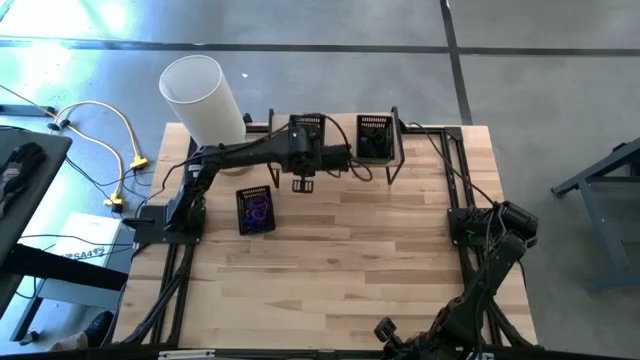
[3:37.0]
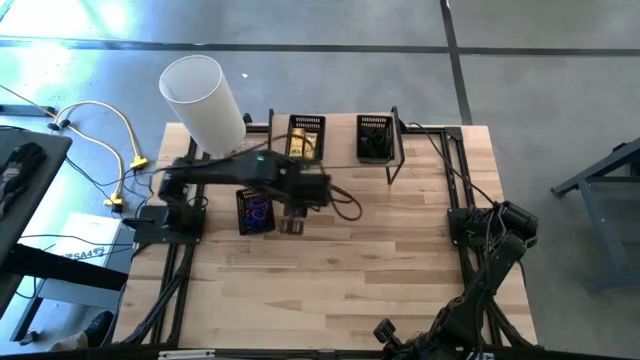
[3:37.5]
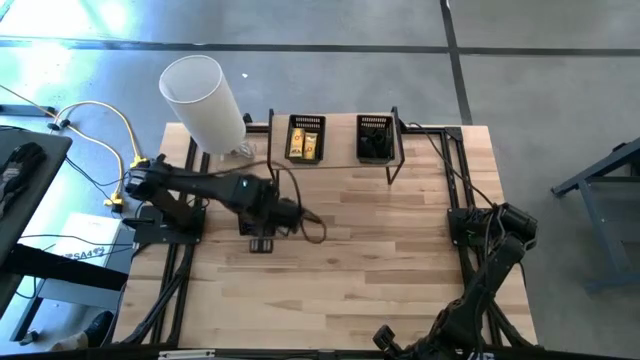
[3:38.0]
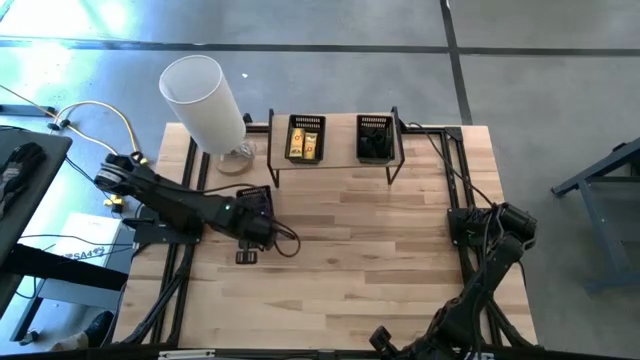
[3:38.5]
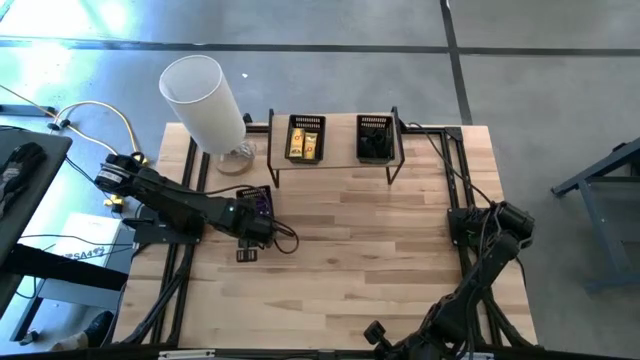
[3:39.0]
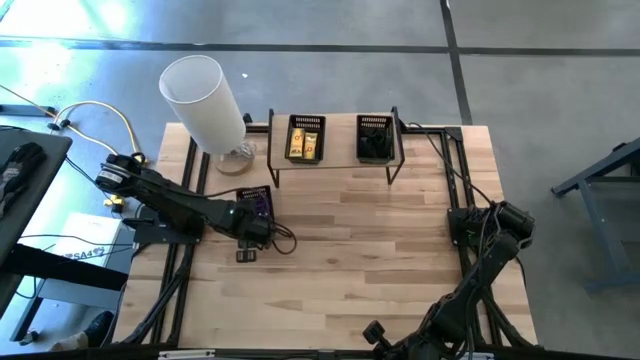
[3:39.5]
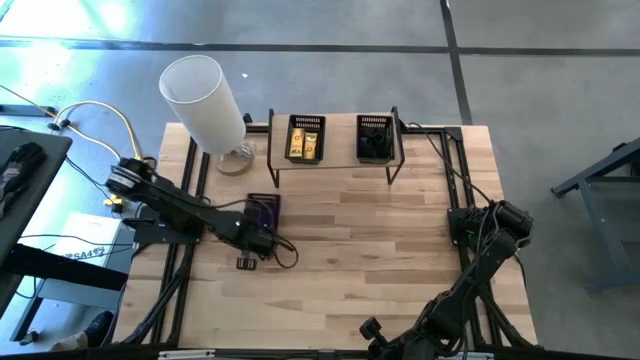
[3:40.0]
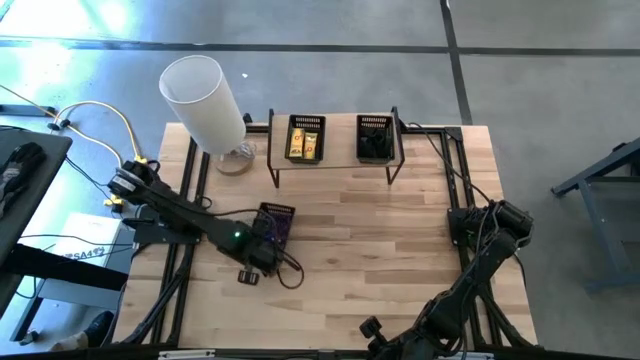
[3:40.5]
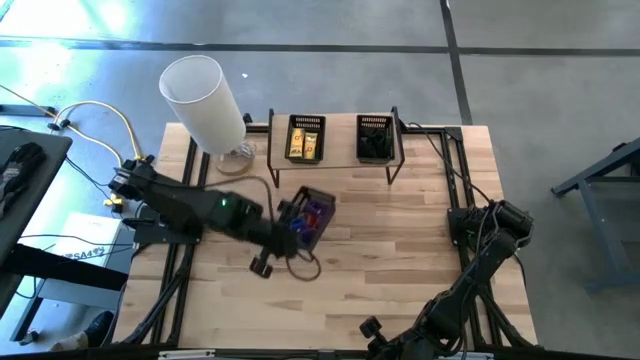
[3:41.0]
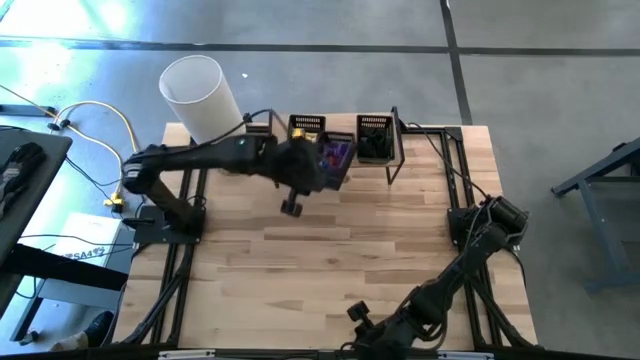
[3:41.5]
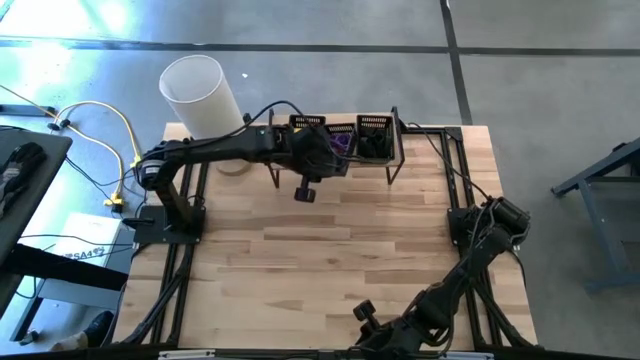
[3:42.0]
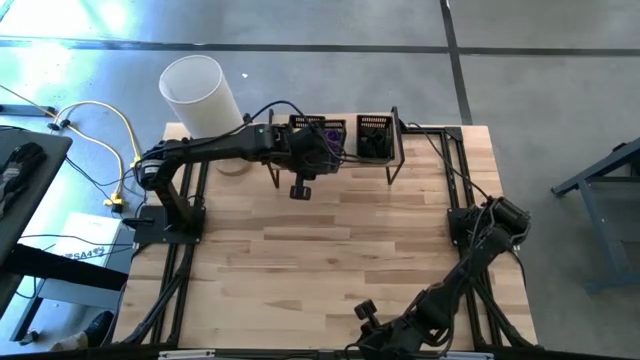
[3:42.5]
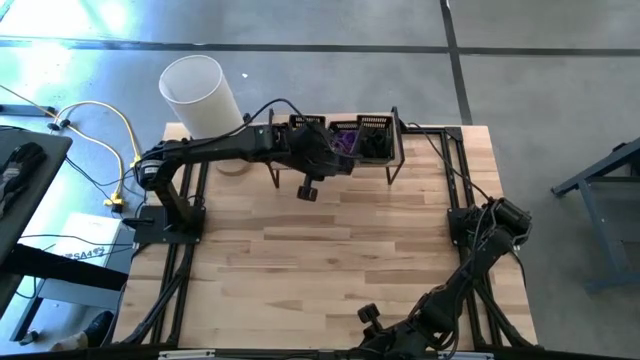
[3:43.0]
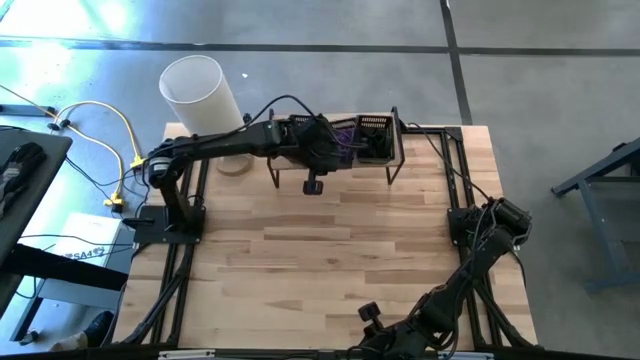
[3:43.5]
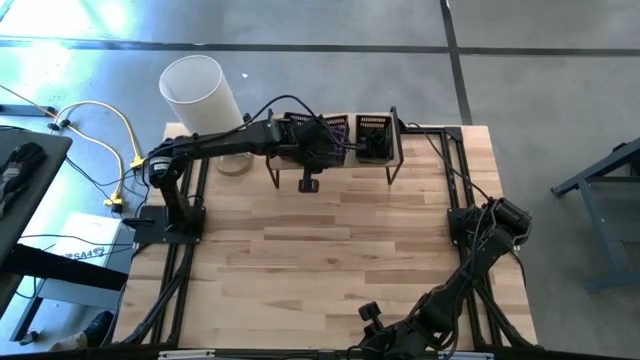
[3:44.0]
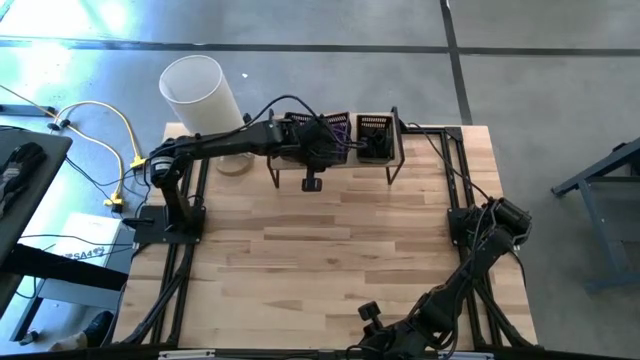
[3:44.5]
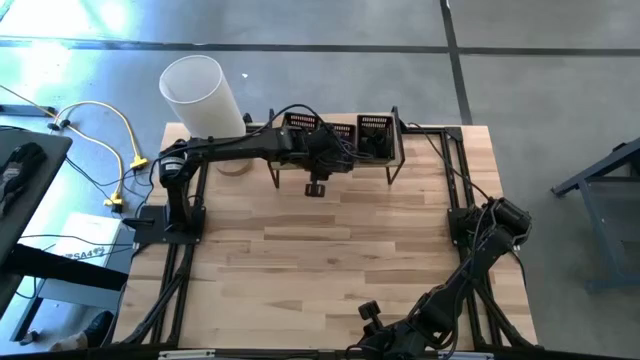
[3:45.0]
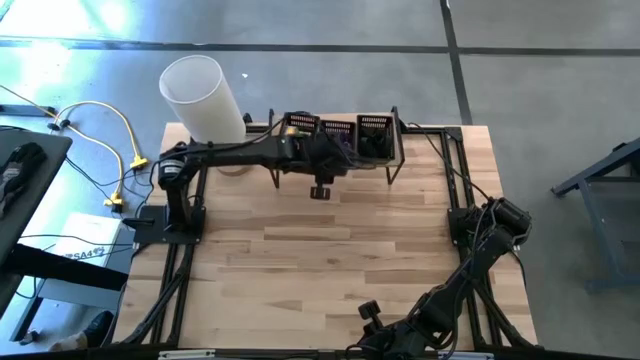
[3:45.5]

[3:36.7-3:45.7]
Task: Pick & Place Office Desk Supplies
Put the bin onto the shelf

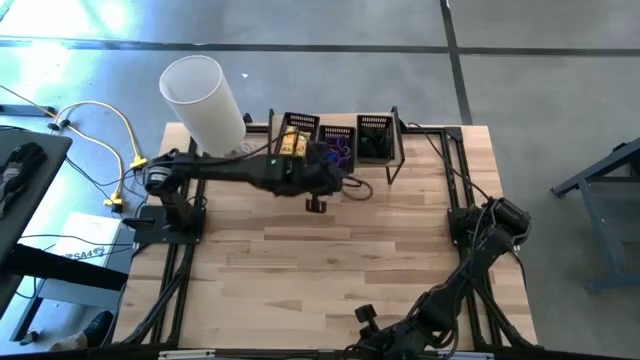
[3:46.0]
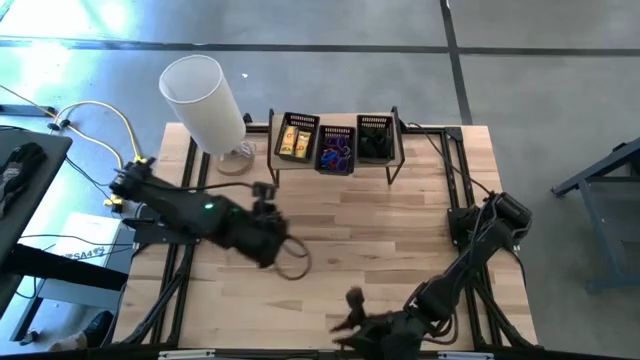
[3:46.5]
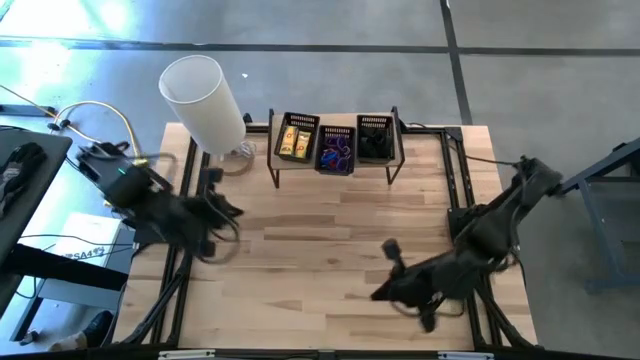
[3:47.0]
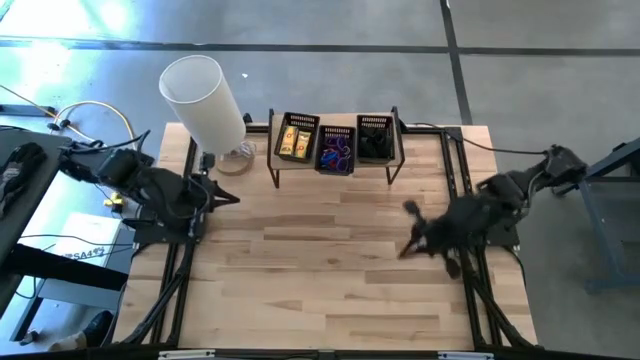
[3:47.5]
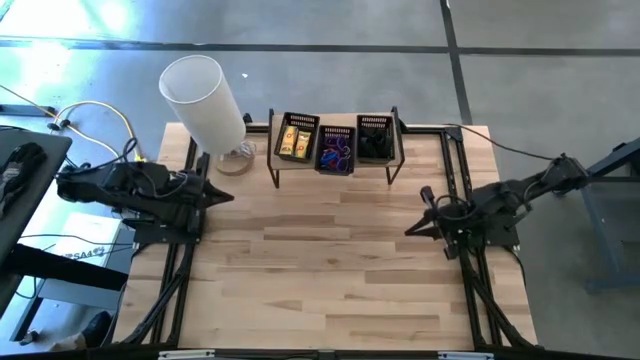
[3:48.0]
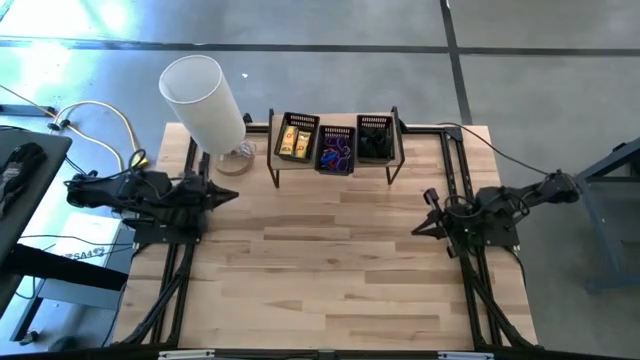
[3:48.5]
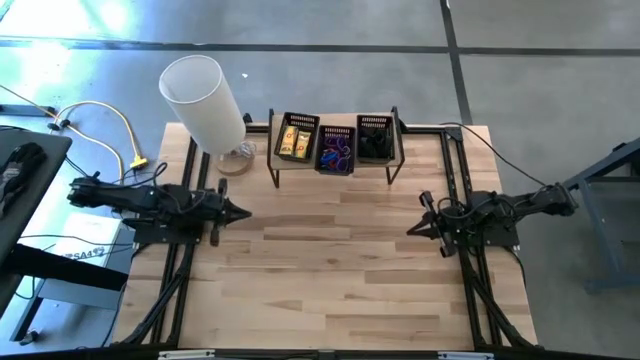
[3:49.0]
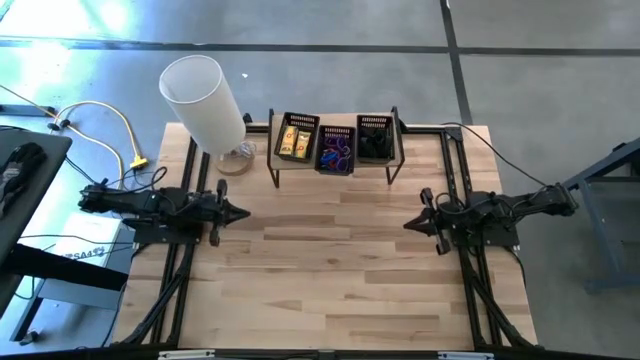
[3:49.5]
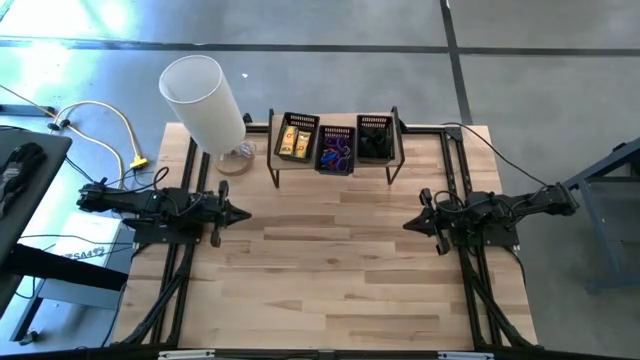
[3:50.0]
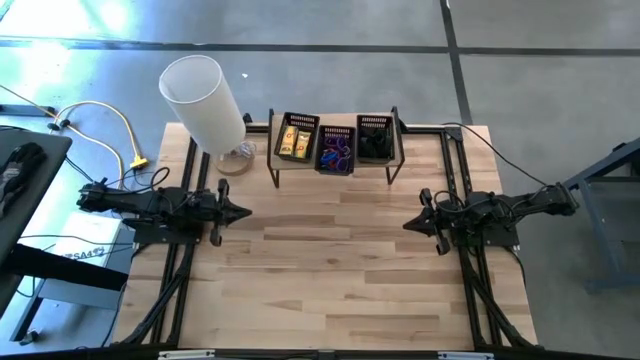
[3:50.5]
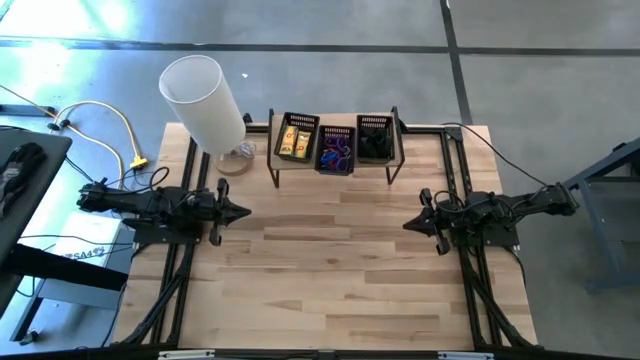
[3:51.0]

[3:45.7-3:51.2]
Return to Home Position

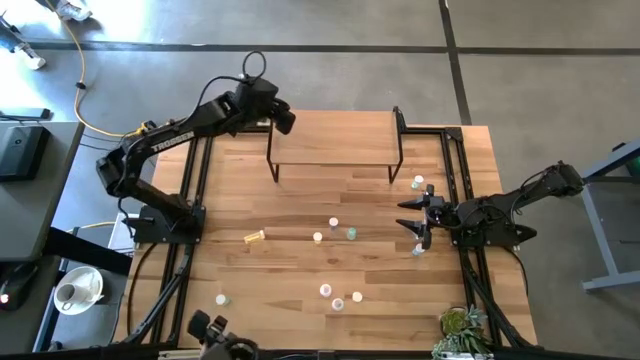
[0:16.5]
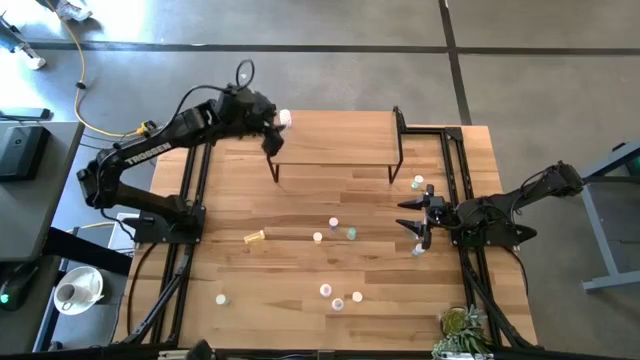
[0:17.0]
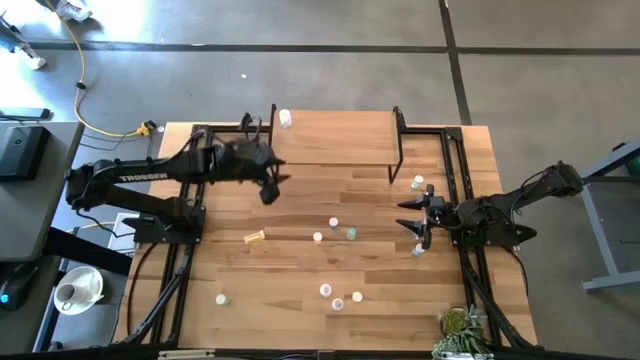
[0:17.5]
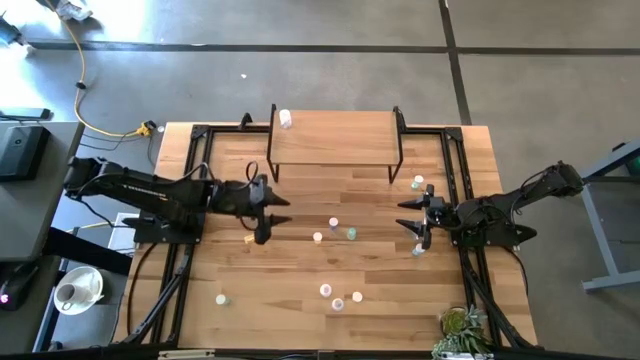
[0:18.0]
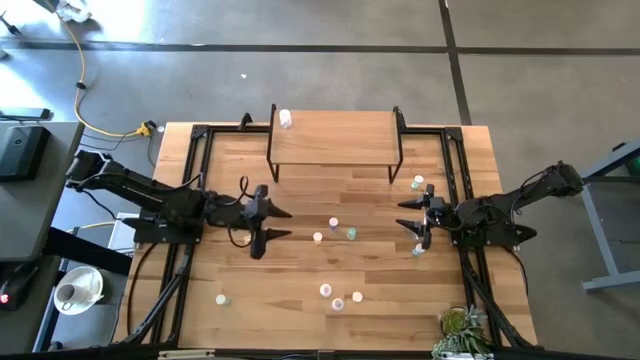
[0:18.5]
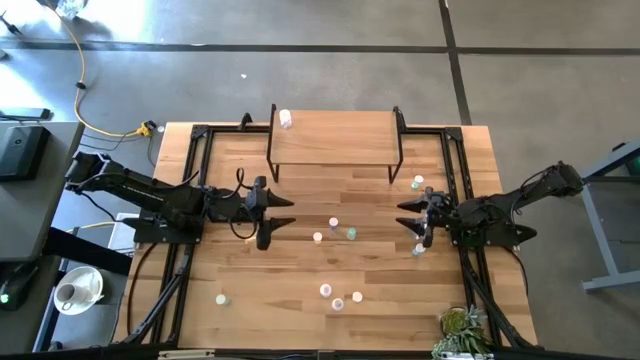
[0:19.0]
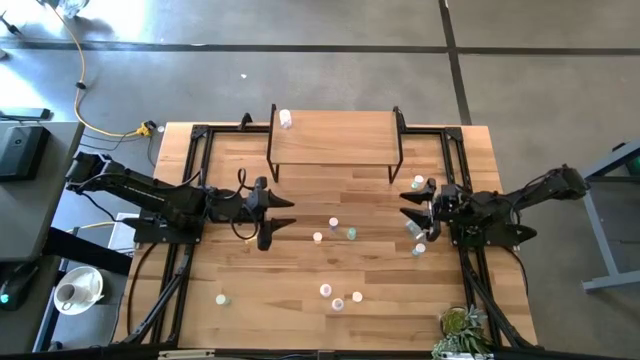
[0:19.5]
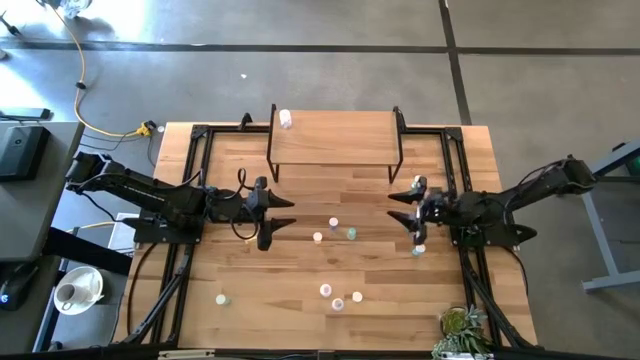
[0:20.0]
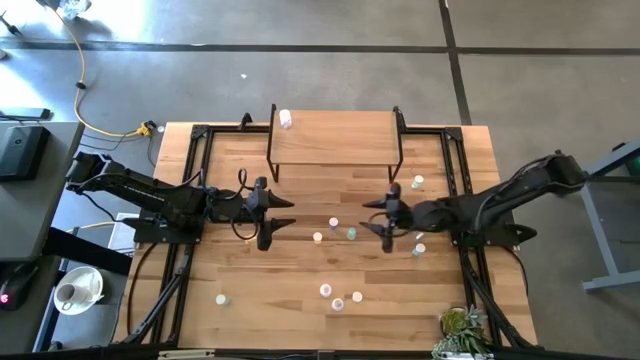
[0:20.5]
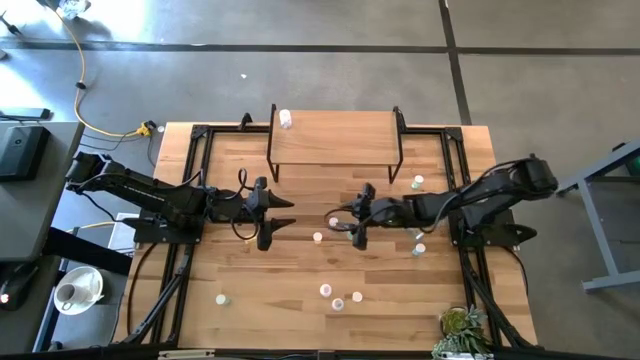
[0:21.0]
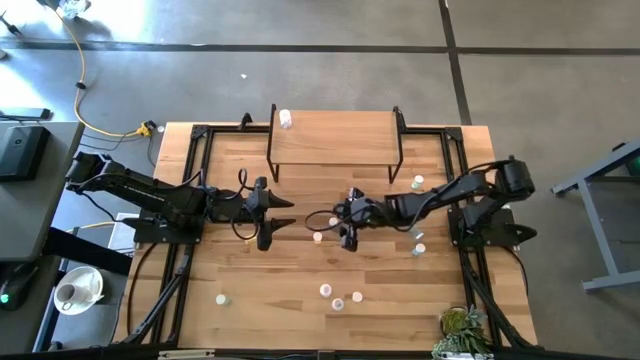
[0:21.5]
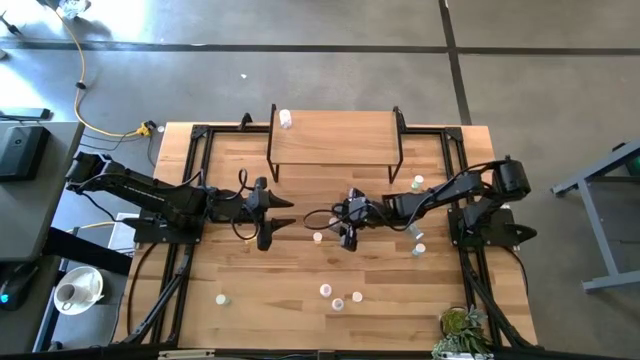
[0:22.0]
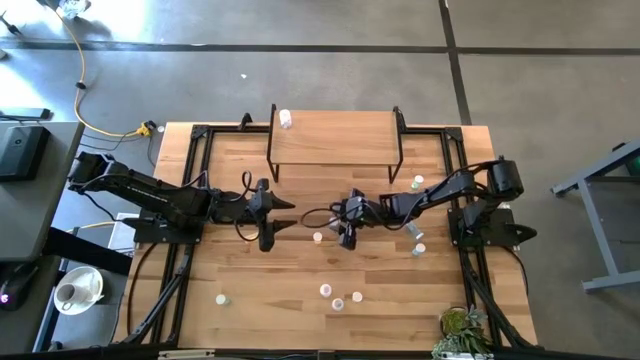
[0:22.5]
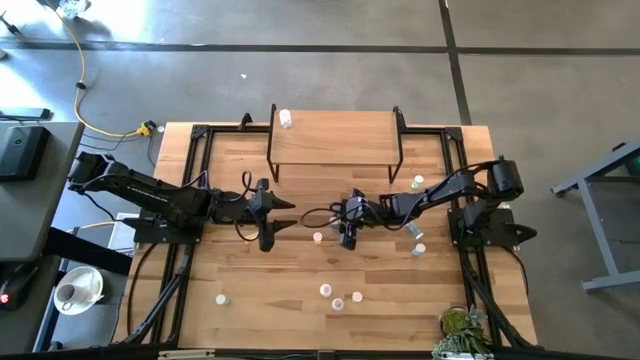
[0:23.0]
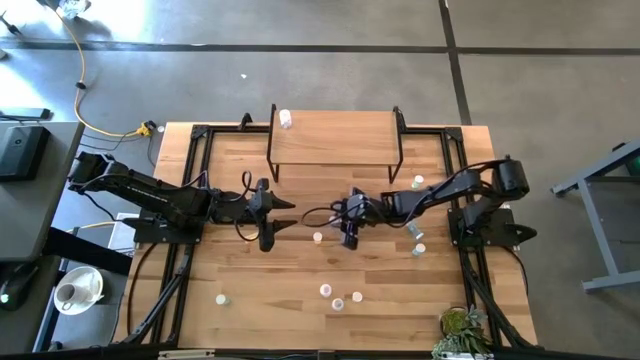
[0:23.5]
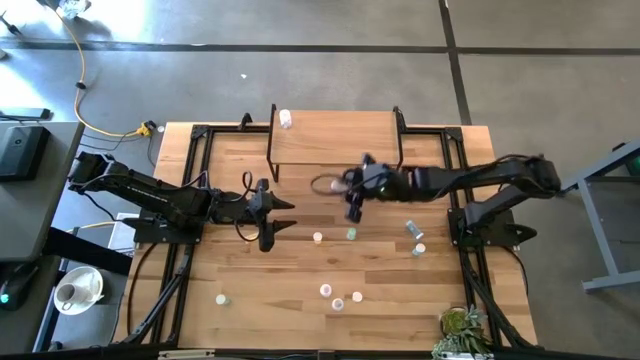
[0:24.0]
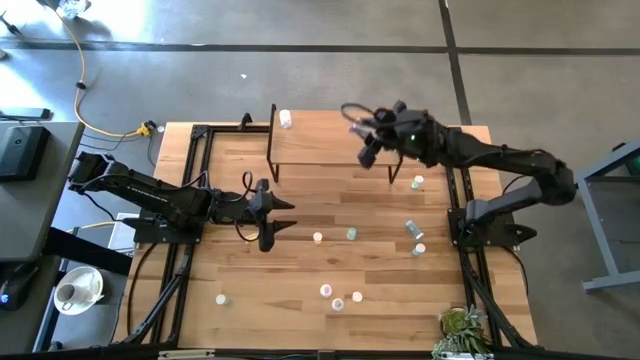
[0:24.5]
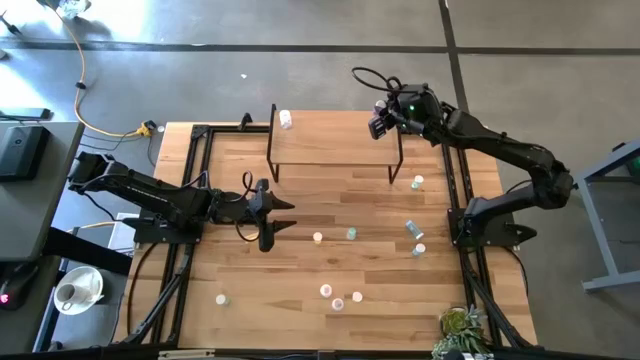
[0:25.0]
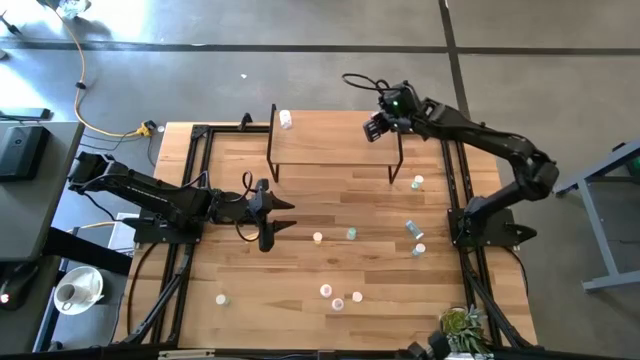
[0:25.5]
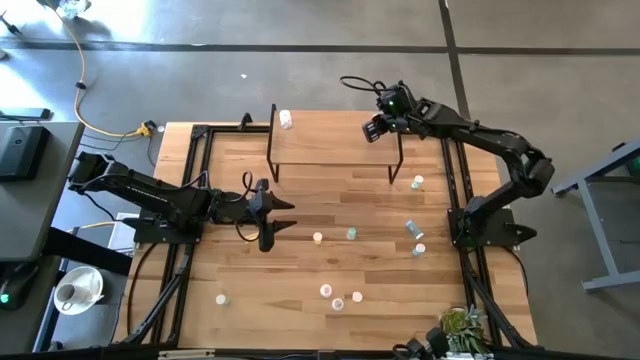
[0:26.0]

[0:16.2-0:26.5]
Task: Pick and place medicine bottles onto shelf by color
Put the top left blue pill bottle on the shelf
